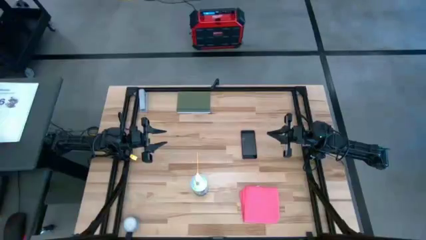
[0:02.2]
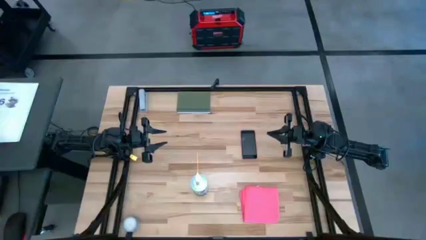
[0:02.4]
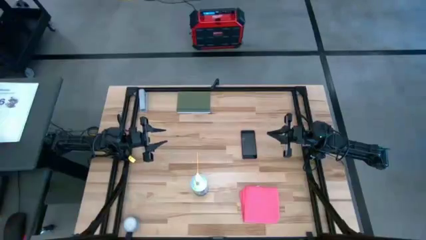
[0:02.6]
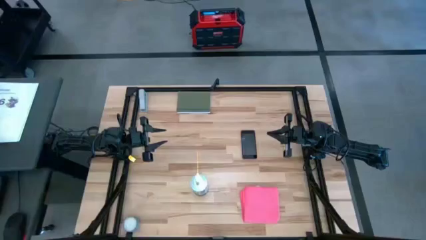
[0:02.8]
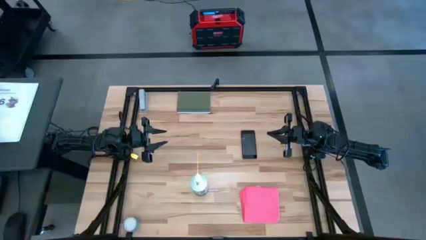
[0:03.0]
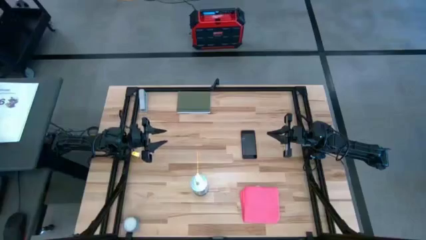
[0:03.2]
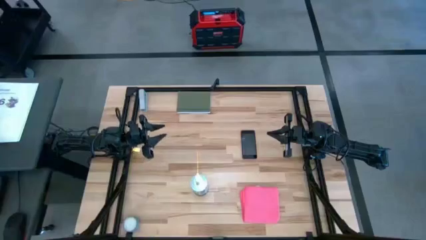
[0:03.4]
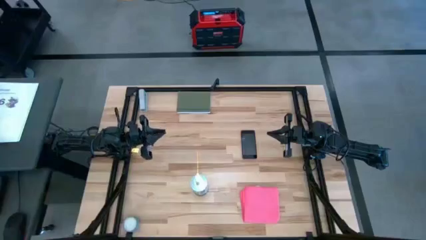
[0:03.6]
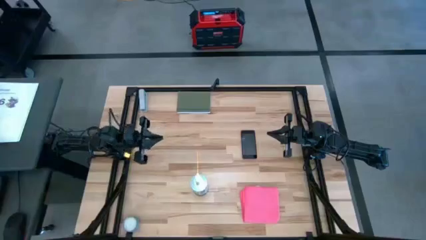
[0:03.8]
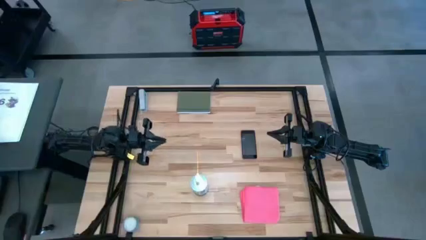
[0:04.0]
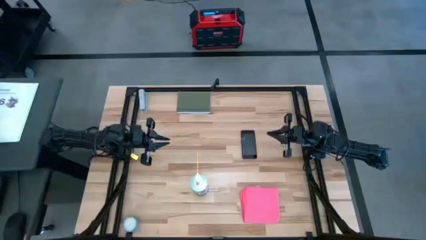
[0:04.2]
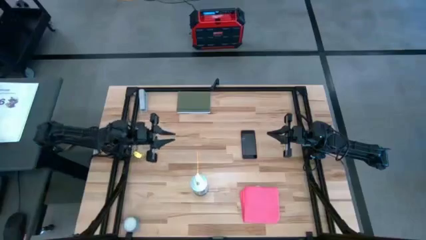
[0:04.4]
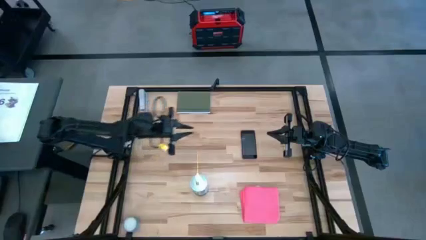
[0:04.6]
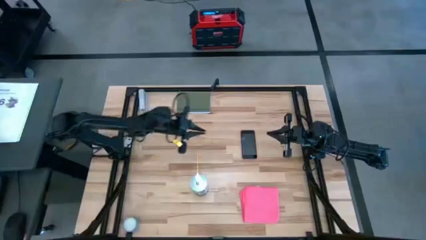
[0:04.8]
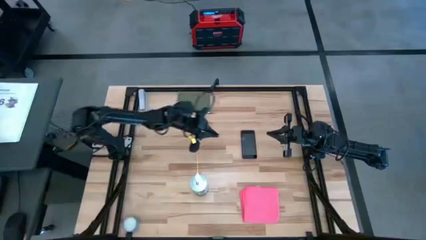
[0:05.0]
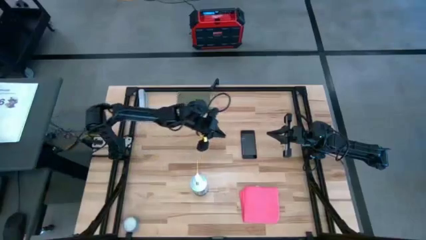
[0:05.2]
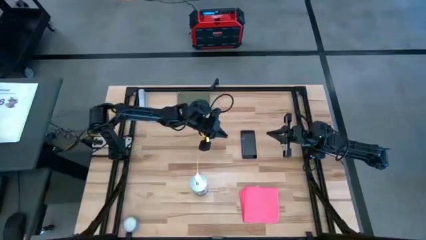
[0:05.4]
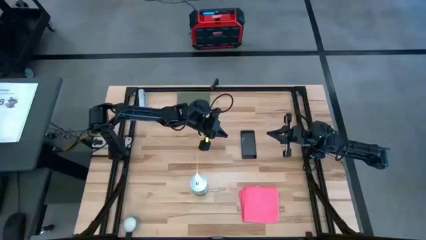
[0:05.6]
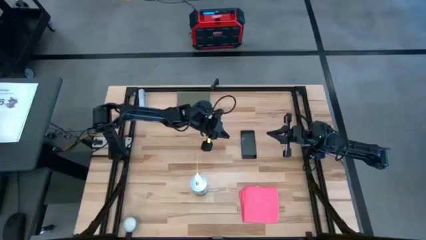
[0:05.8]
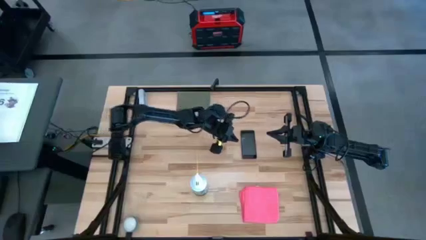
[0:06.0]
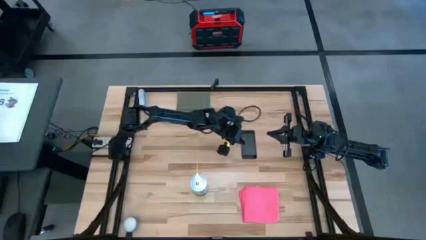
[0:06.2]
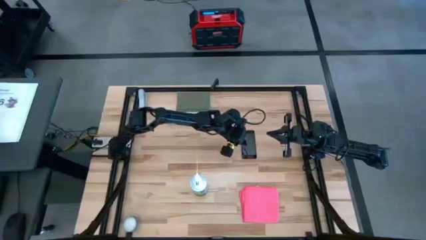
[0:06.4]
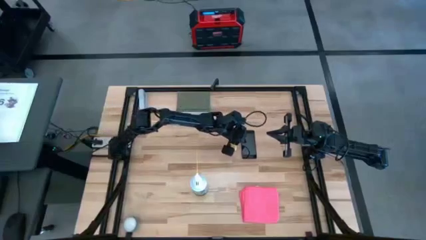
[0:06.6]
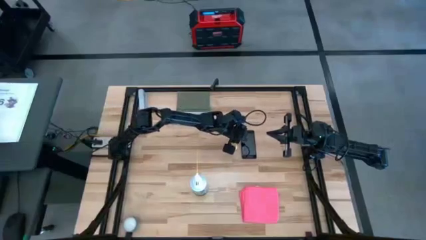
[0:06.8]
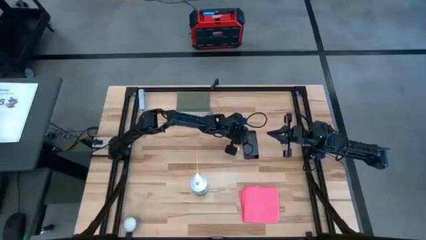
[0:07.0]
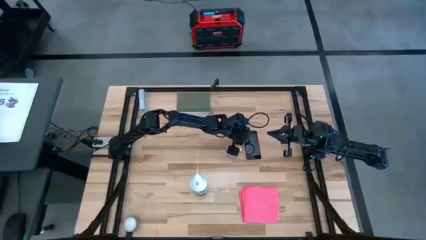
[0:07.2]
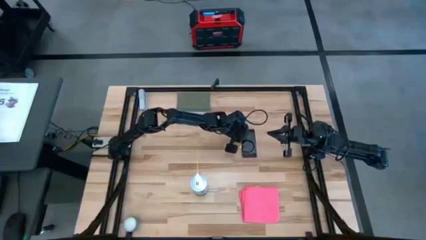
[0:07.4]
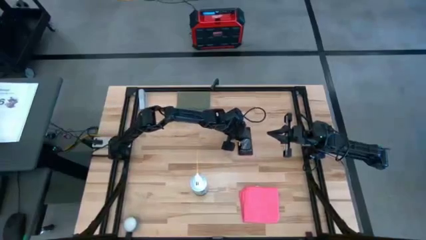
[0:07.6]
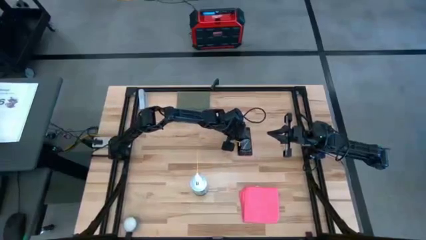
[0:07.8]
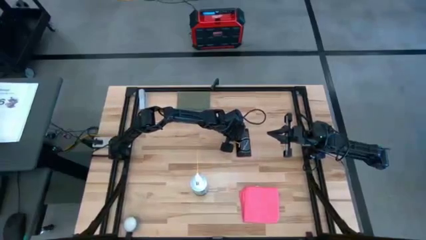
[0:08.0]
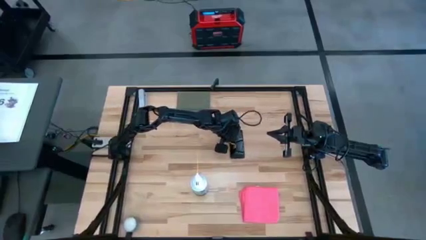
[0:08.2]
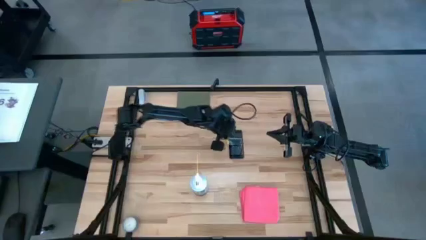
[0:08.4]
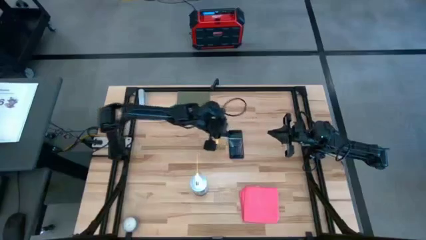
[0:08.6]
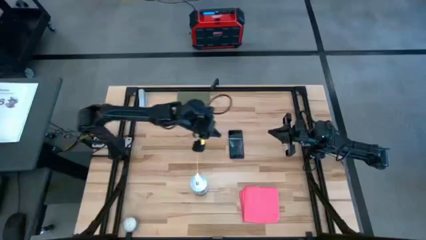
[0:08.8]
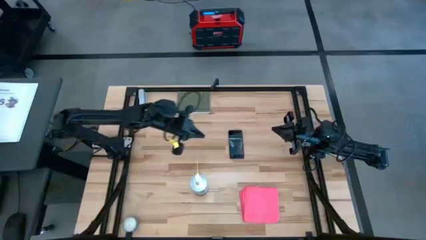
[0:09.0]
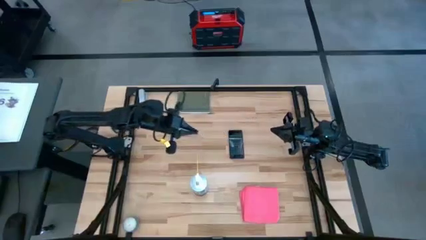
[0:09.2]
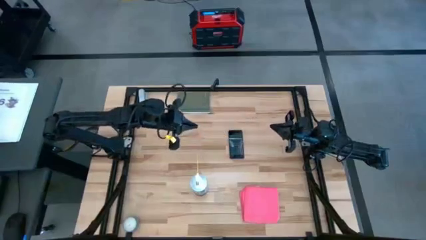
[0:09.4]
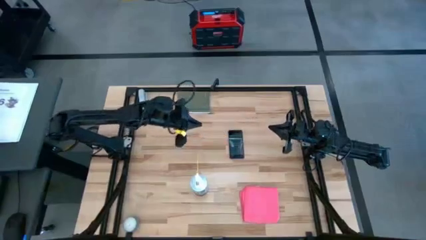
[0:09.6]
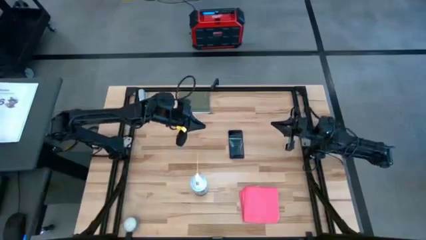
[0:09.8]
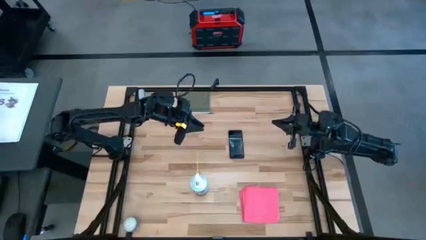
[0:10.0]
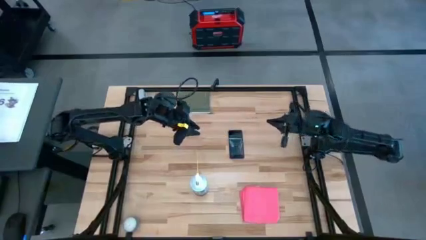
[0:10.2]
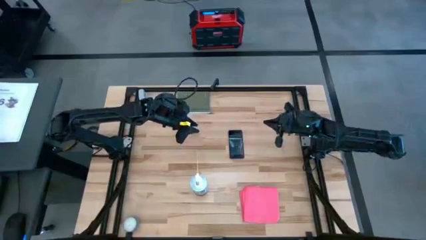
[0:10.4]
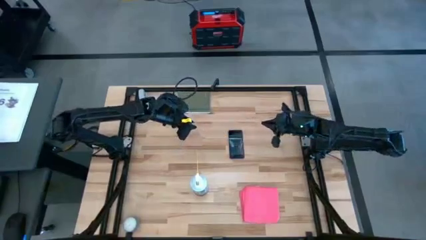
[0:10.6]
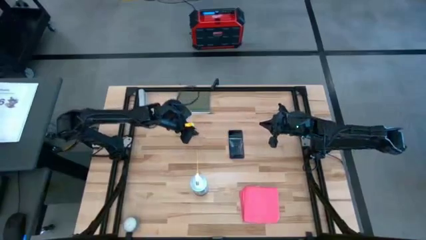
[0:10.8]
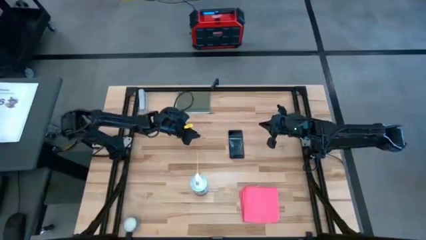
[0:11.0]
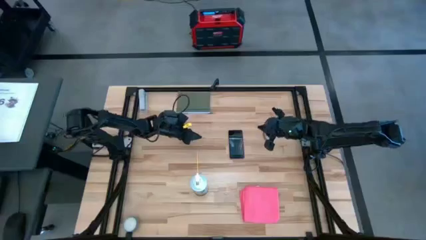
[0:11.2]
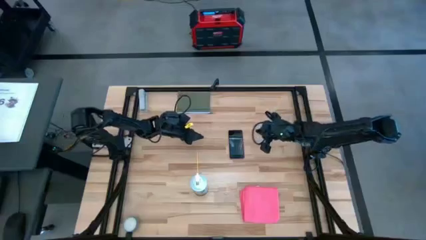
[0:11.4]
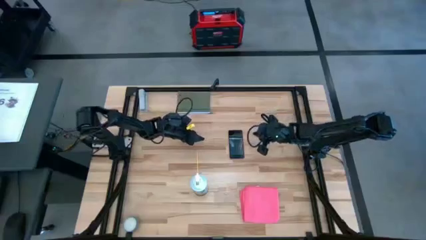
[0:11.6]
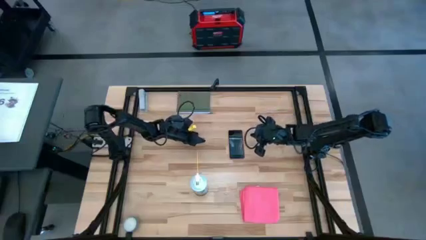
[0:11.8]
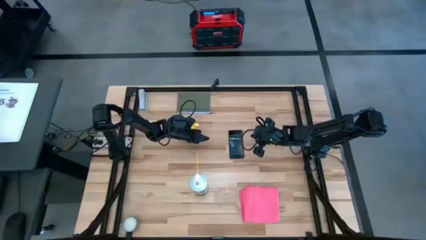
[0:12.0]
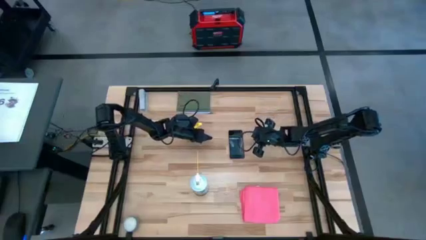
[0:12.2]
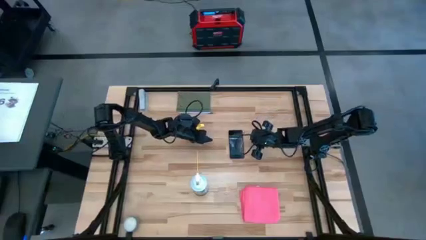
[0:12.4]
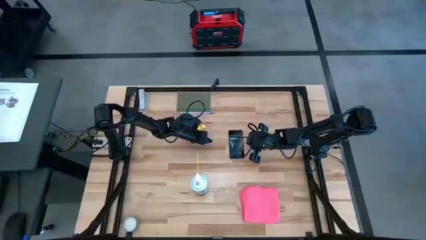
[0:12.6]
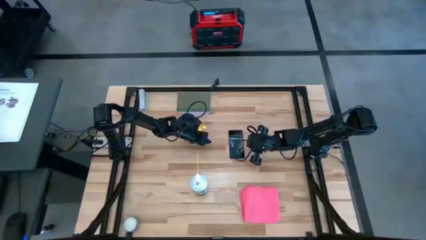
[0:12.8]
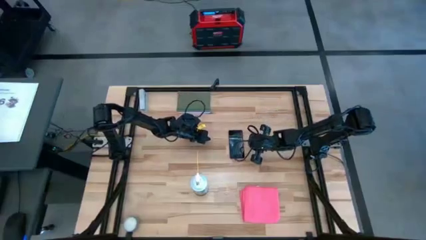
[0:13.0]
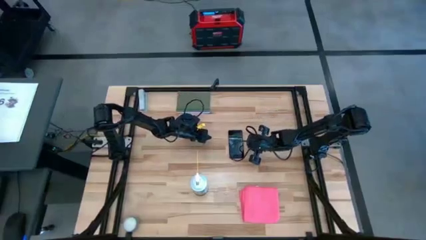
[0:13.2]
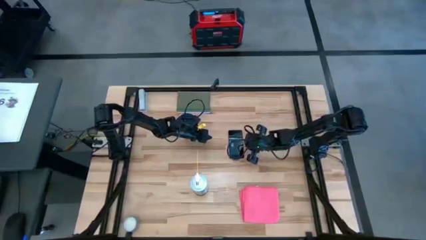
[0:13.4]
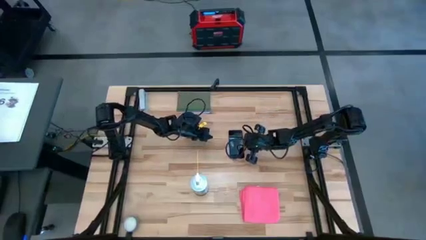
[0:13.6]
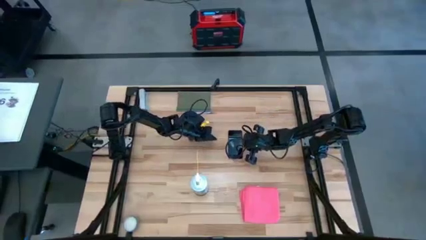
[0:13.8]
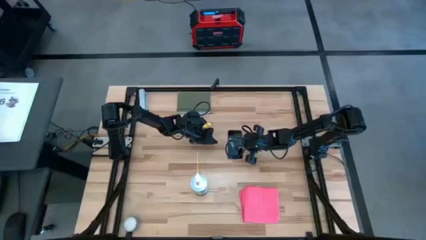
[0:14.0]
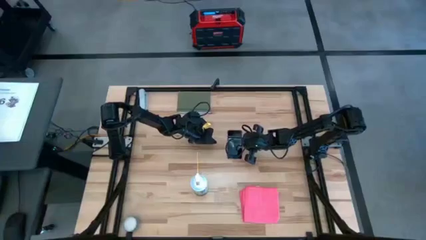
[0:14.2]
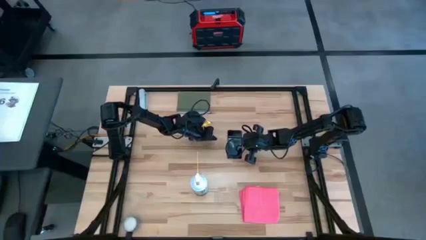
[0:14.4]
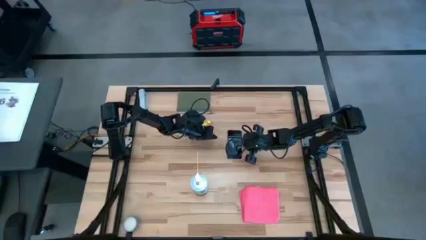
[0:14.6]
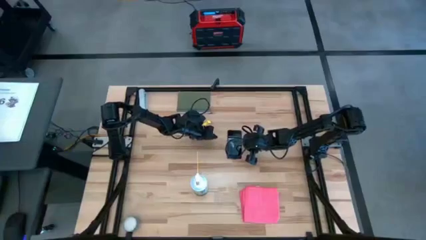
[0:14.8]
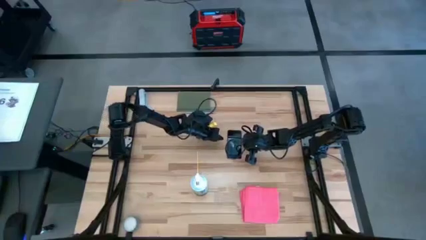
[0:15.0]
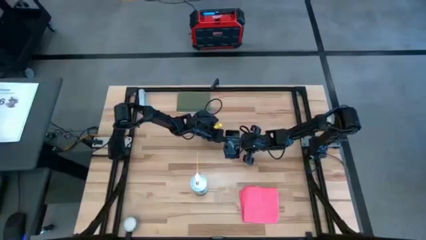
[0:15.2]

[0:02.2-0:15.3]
Task: Apply microfiber cloth
Spray the front of the pink cellphone with the white spray bottle

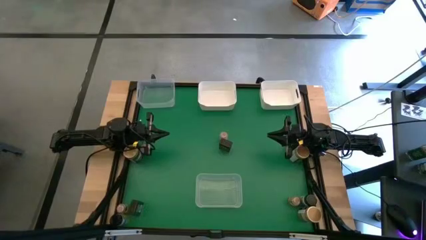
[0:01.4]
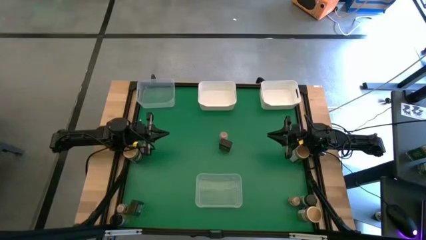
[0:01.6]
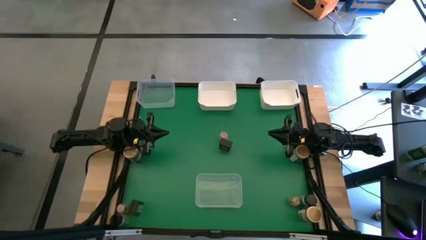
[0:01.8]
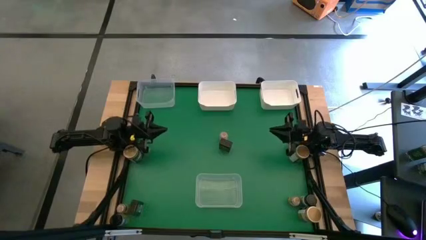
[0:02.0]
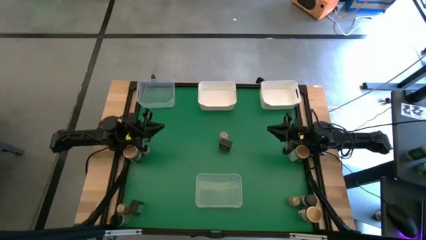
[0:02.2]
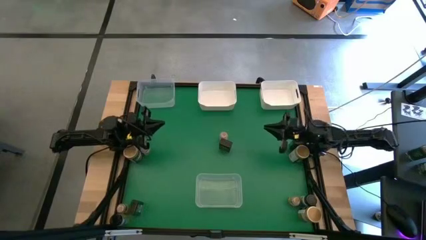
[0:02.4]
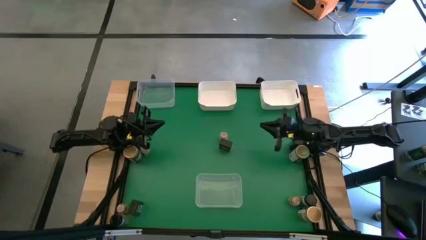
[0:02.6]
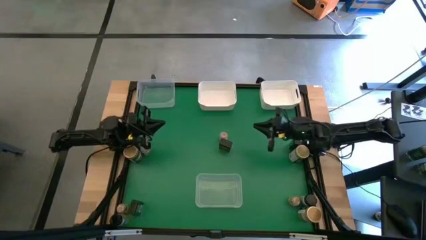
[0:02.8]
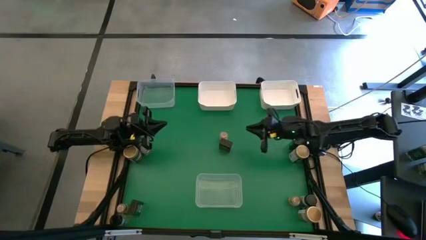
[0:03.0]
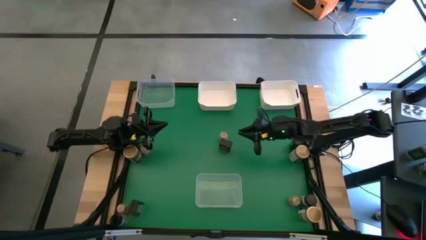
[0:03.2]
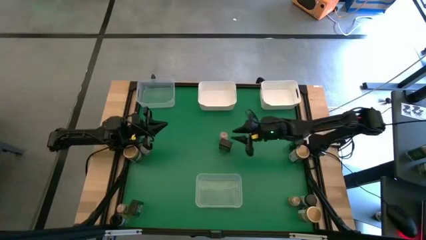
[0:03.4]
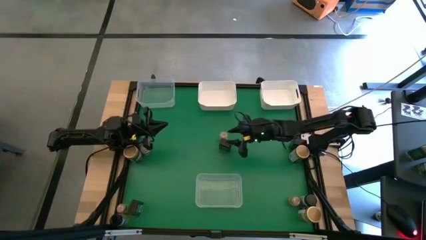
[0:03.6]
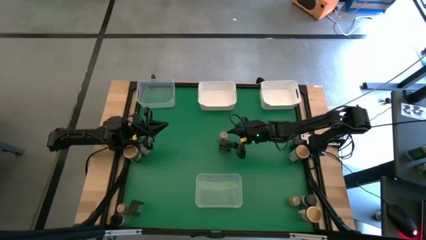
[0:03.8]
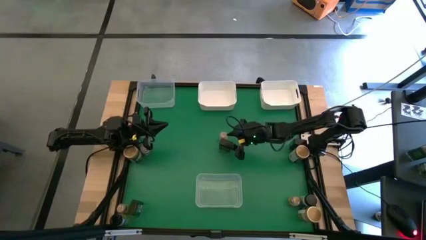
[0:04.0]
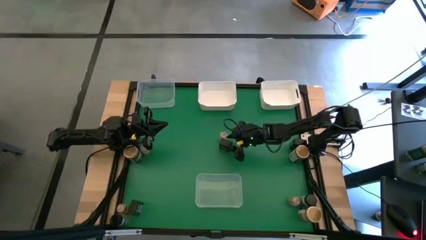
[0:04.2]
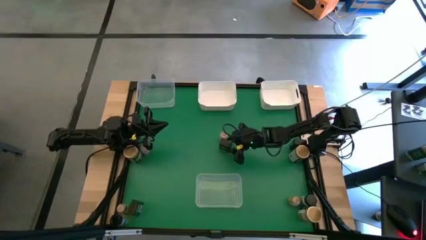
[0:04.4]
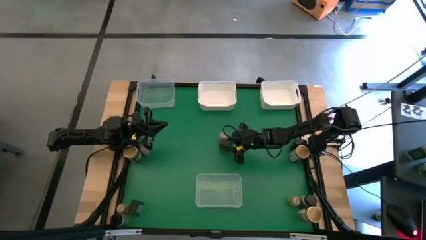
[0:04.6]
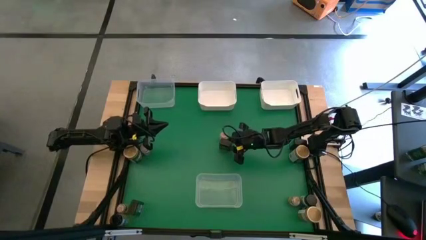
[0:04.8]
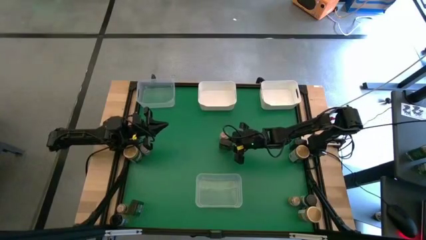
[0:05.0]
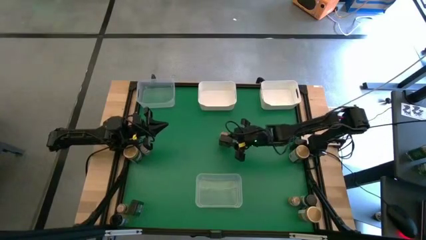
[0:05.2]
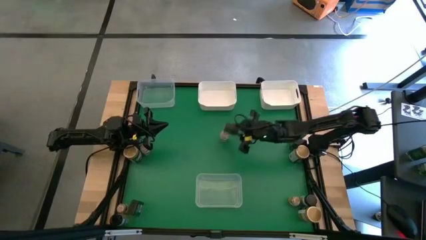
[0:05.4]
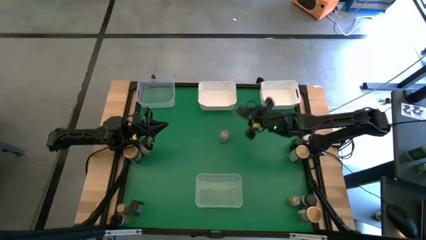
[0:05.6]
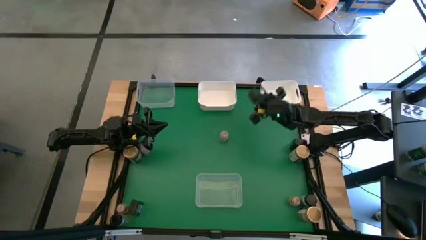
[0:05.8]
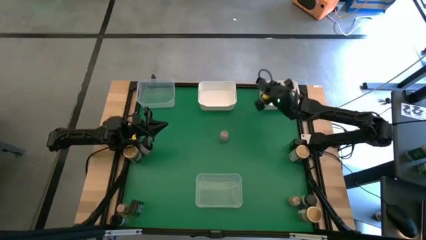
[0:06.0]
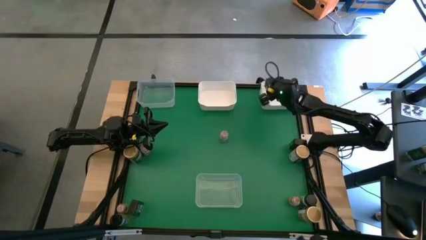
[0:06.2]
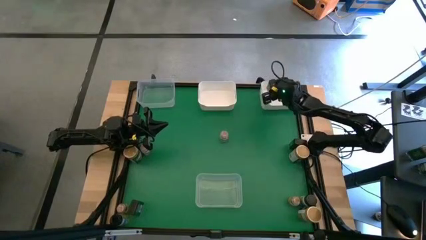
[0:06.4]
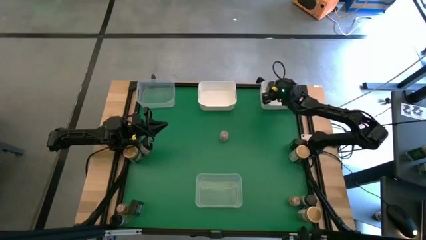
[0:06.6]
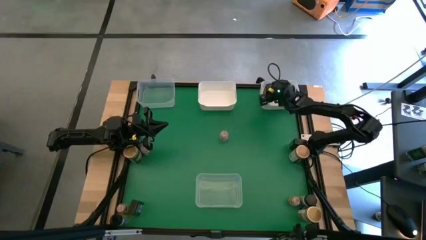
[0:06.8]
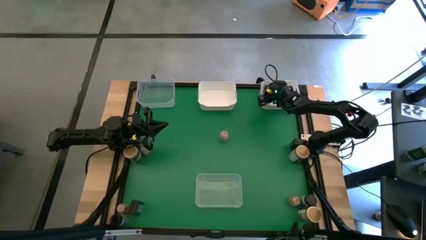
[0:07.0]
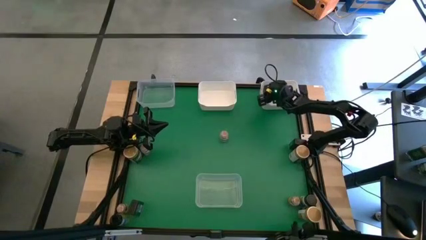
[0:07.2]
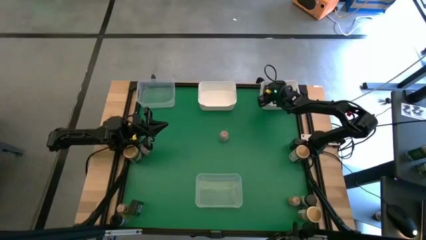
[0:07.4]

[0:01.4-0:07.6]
Task: Sort spices by type
Put the green seasoning can into the right white bin
